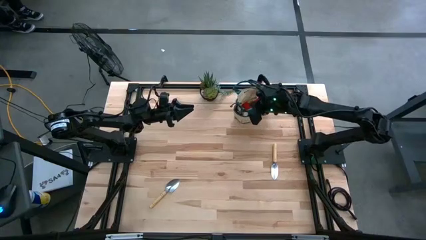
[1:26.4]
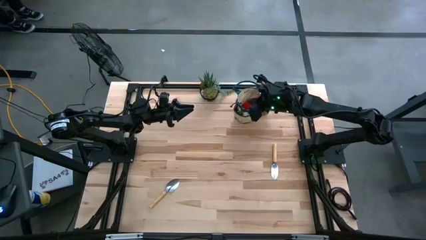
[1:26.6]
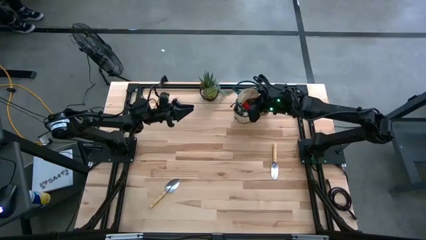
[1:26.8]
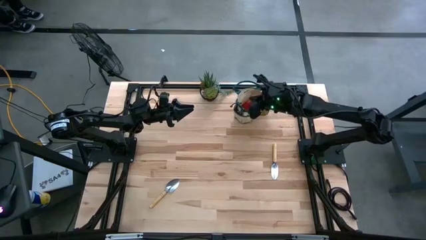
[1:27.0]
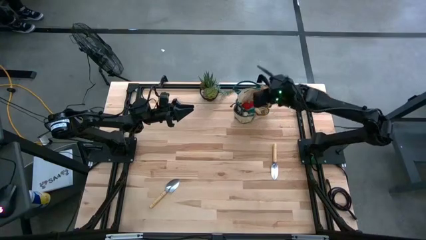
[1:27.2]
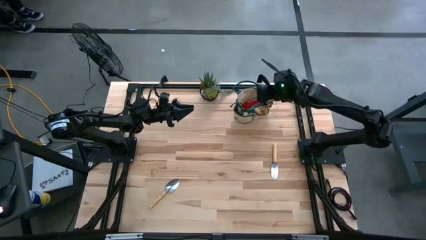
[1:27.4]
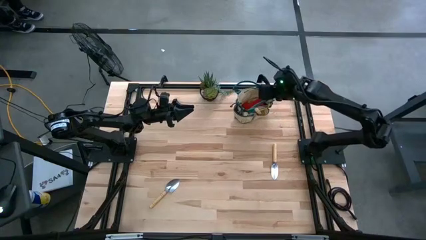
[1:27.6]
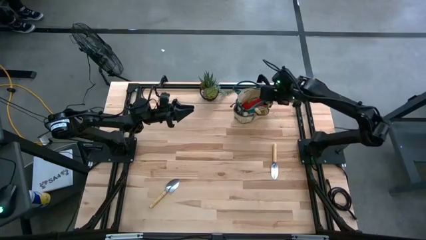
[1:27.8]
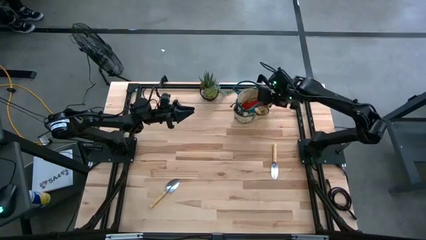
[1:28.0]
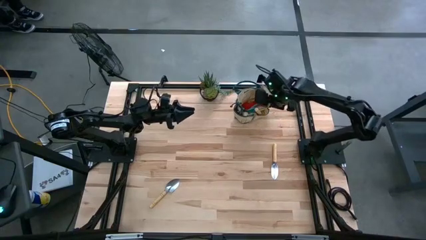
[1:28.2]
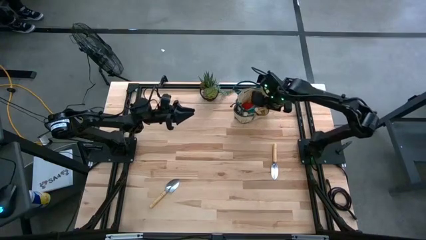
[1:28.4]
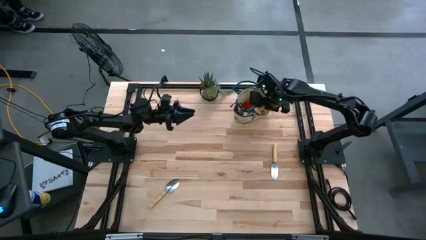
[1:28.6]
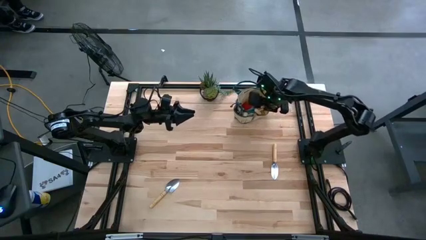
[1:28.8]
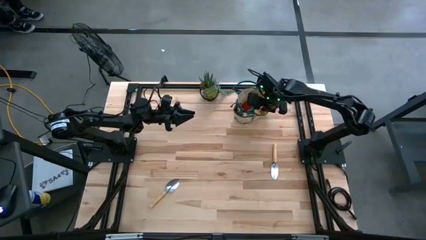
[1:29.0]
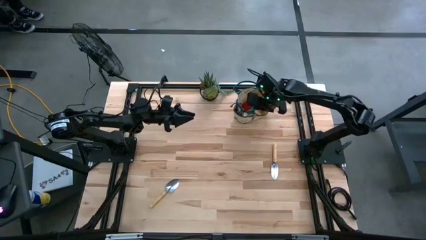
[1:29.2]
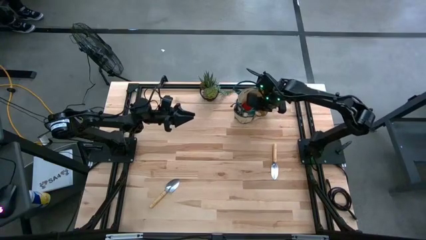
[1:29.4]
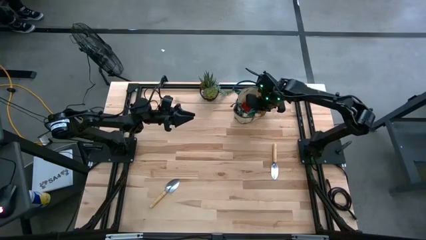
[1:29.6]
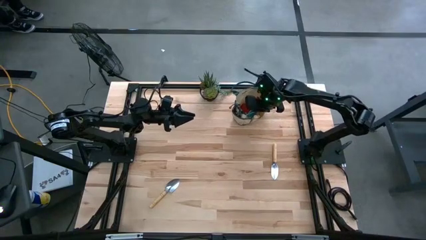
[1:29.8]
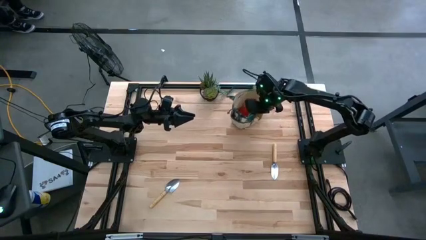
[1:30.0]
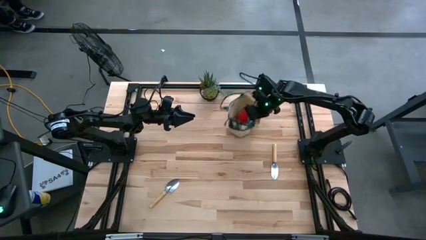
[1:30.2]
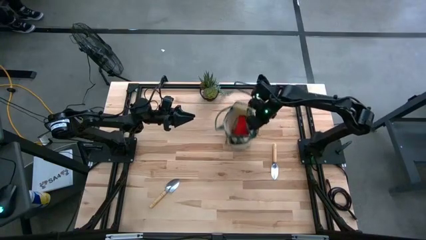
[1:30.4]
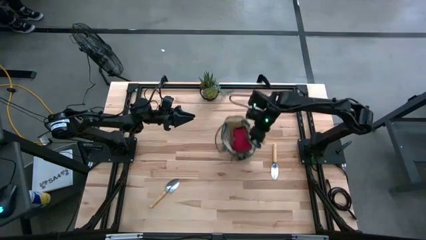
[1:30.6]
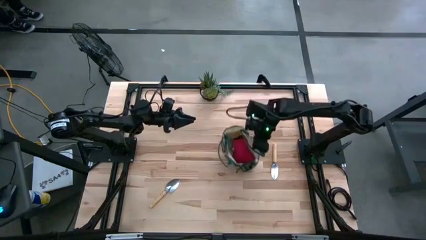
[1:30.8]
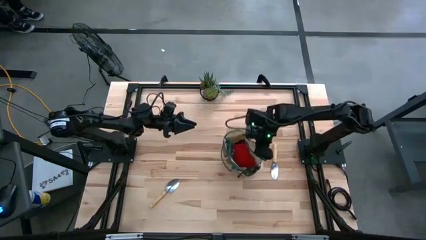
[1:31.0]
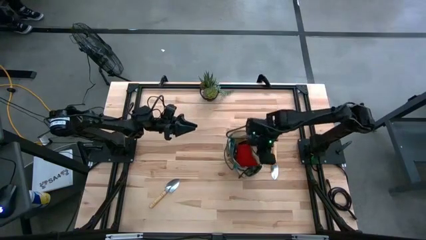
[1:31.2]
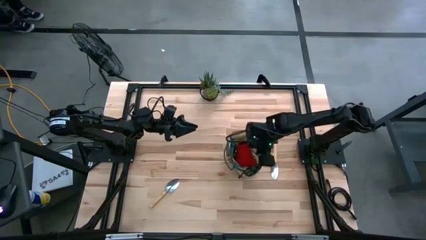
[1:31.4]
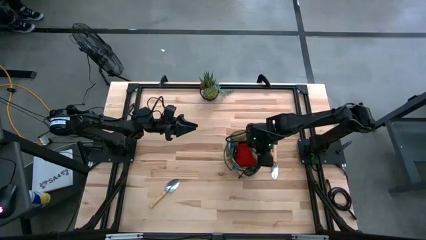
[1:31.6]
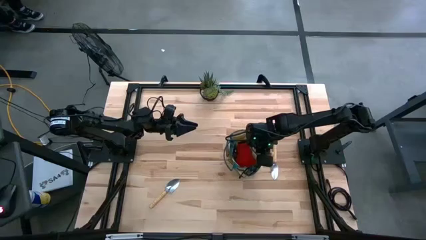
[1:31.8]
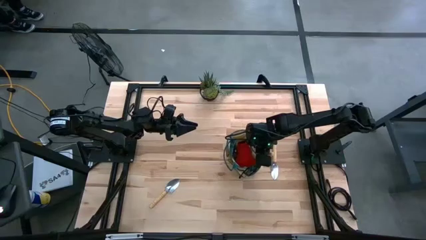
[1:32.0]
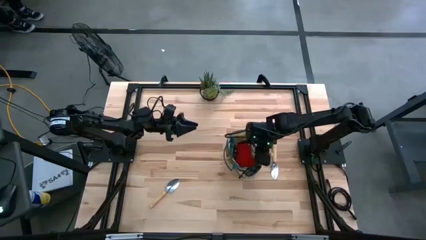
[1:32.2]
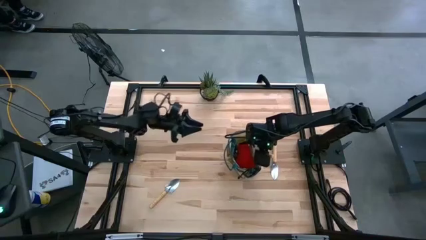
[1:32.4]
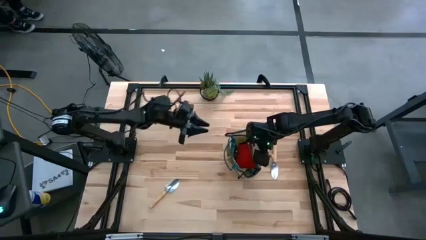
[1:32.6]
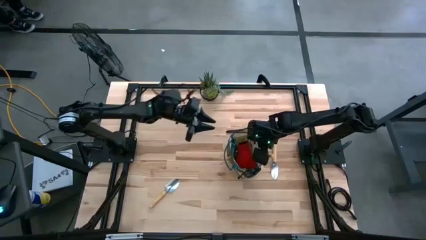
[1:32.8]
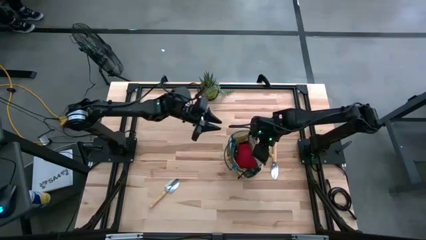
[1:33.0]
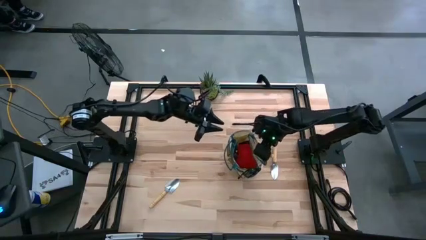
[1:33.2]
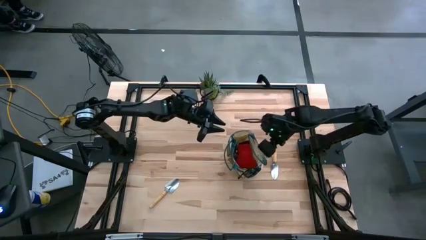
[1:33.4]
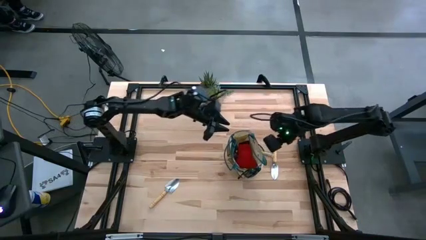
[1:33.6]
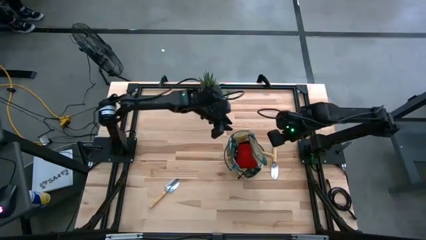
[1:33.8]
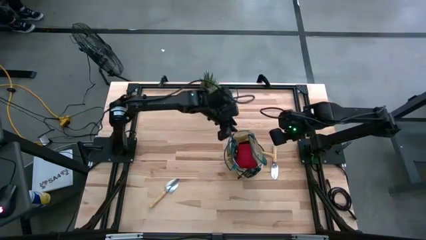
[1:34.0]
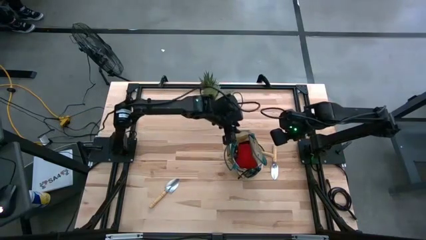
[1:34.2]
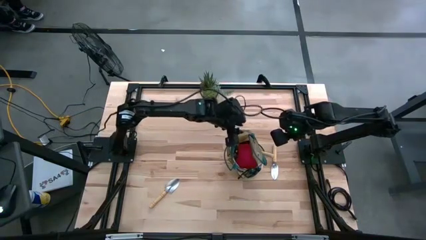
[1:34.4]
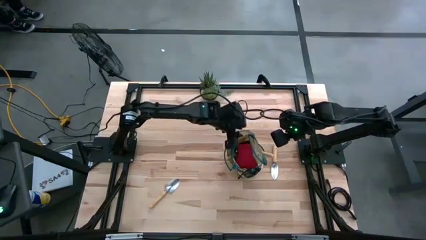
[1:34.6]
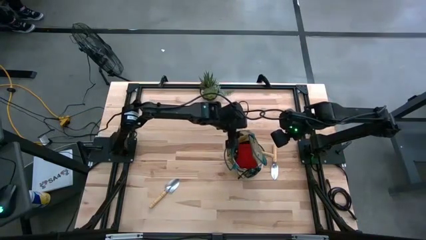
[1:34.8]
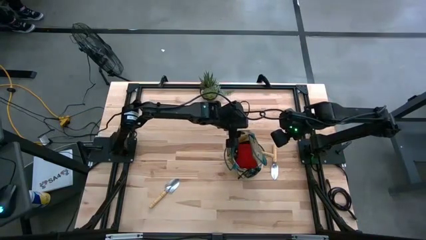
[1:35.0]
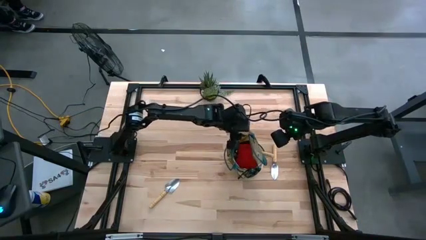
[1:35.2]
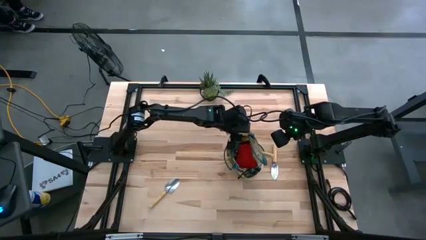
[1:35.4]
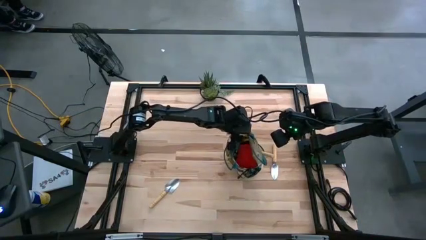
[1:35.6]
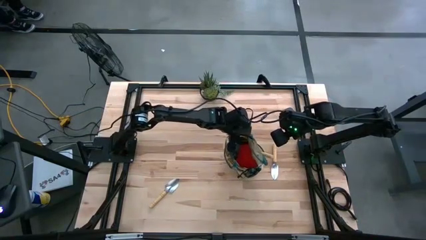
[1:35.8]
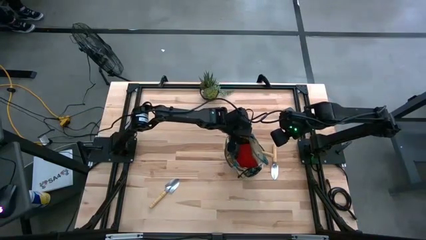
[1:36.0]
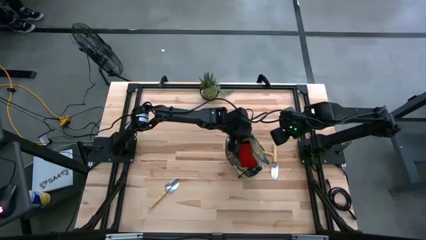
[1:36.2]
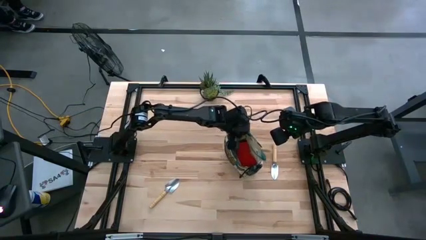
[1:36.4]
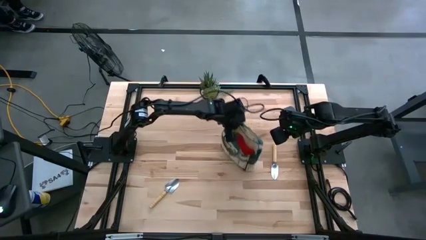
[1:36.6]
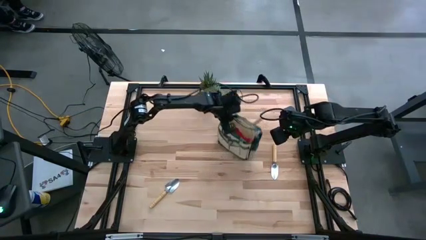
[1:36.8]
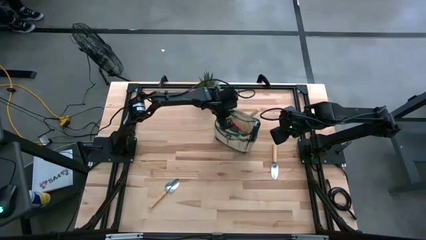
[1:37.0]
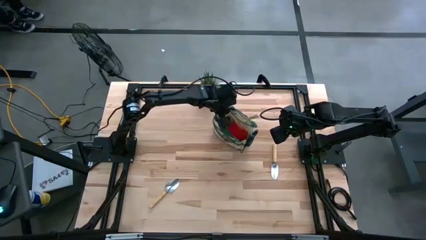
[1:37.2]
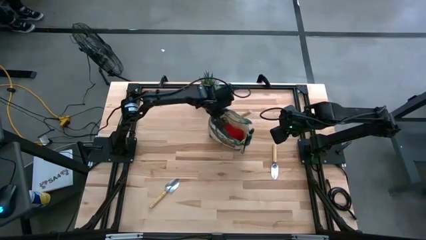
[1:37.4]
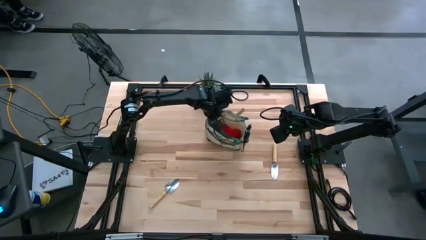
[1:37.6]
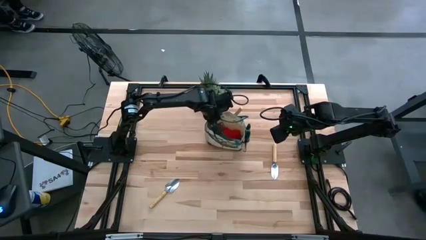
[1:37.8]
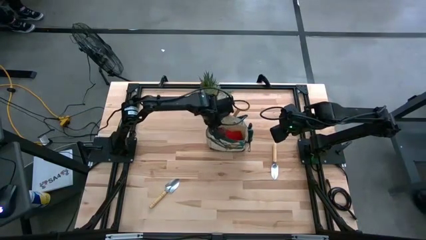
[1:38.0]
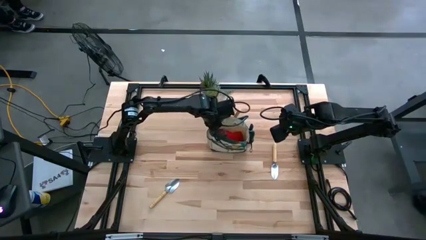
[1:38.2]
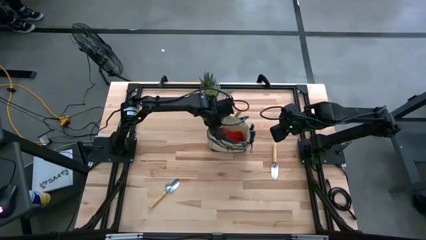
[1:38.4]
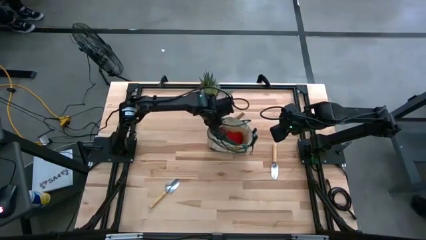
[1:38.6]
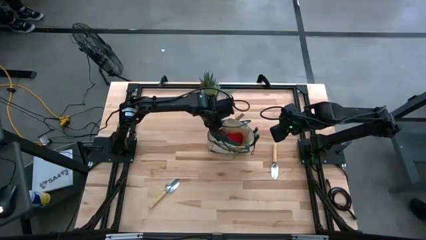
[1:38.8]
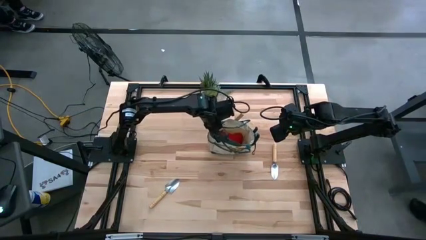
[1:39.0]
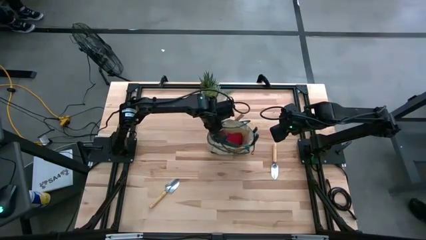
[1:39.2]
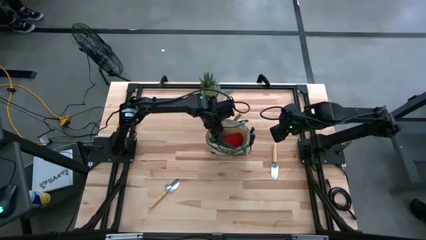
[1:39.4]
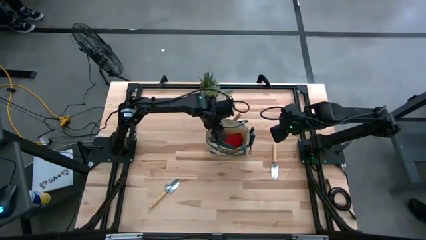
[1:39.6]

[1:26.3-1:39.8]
Task: Pick & Place Garden tools in Gardening bag
Move the light brown gardening bag to the center of the table
